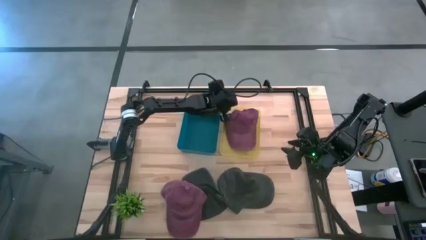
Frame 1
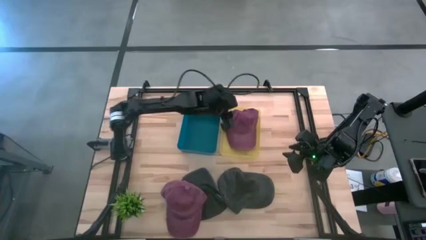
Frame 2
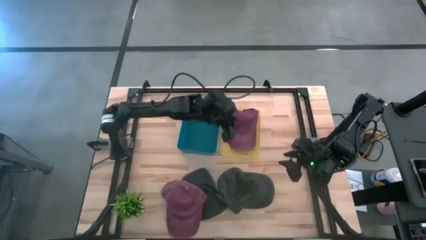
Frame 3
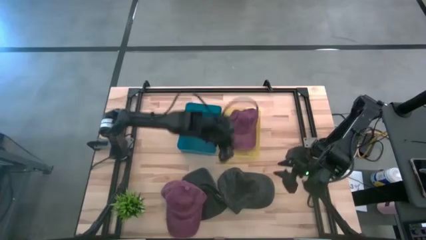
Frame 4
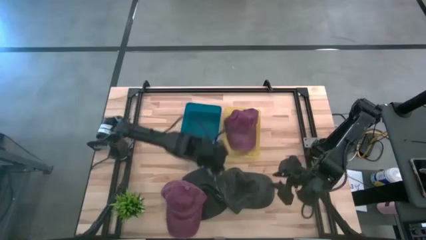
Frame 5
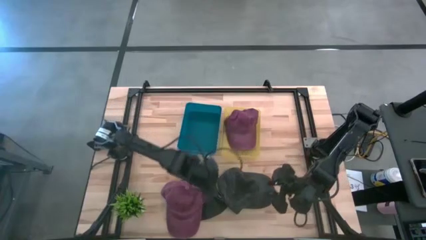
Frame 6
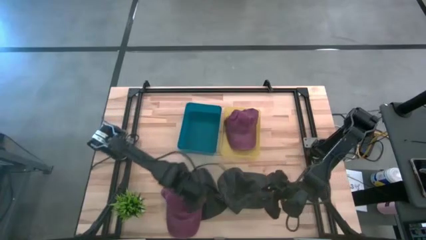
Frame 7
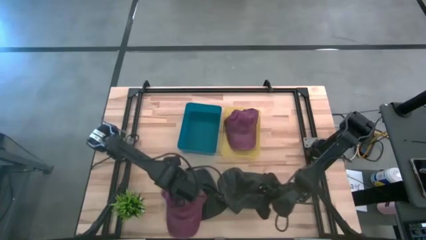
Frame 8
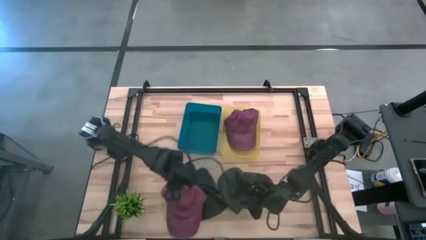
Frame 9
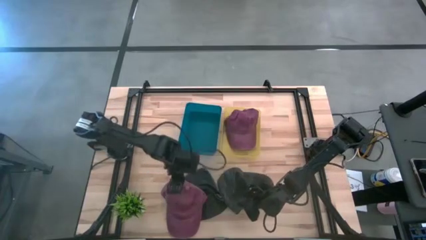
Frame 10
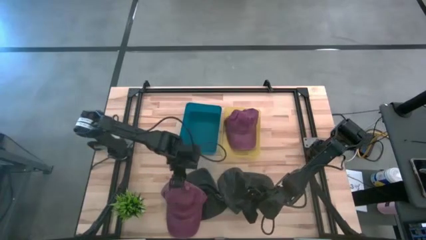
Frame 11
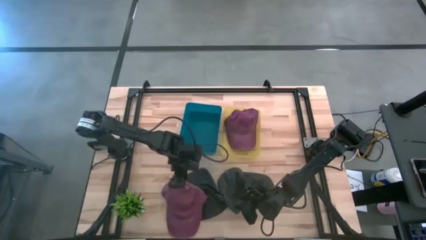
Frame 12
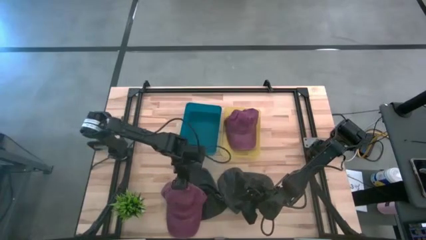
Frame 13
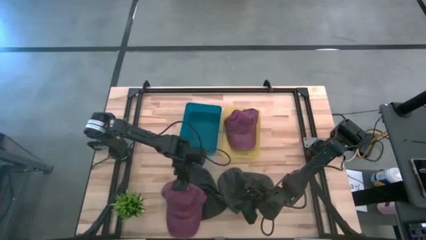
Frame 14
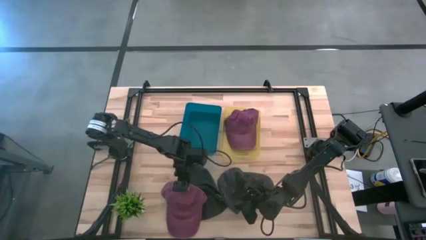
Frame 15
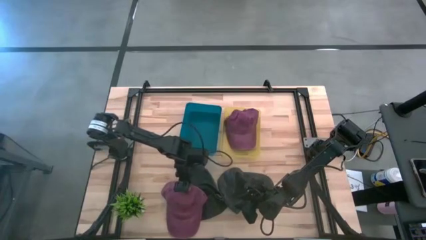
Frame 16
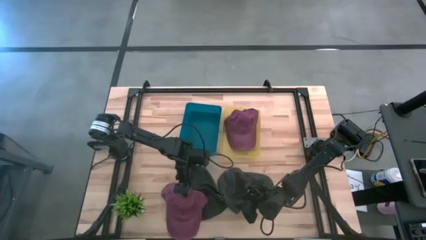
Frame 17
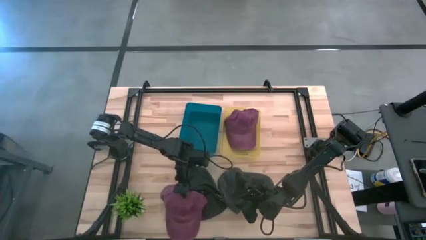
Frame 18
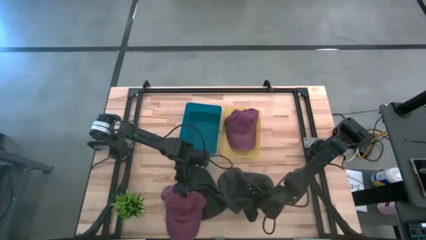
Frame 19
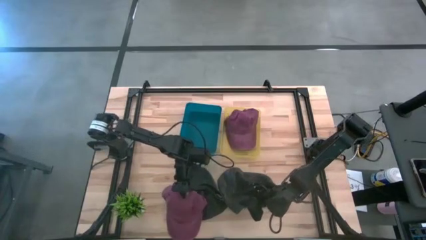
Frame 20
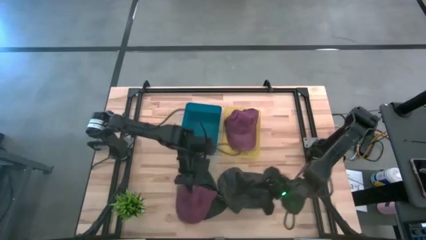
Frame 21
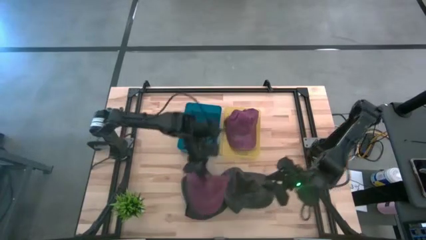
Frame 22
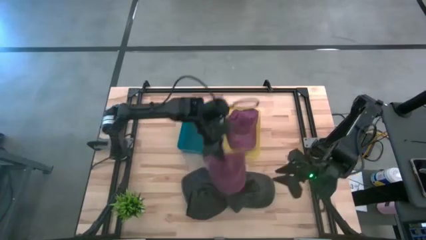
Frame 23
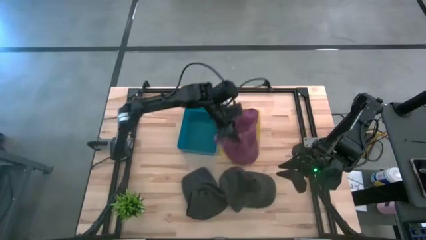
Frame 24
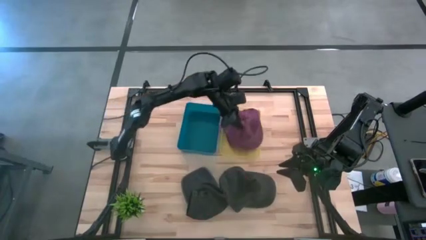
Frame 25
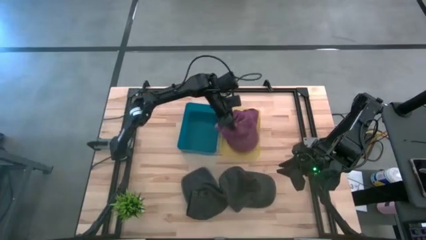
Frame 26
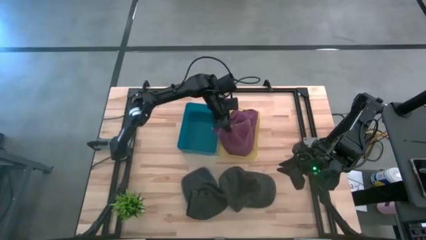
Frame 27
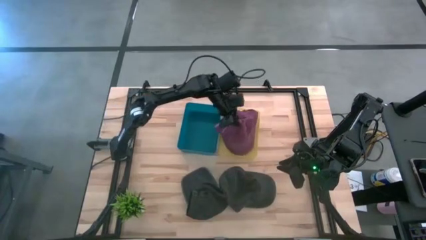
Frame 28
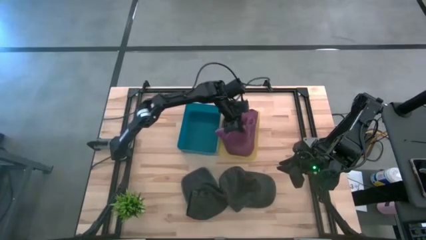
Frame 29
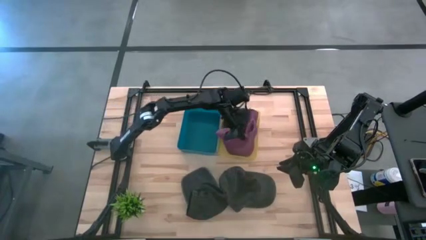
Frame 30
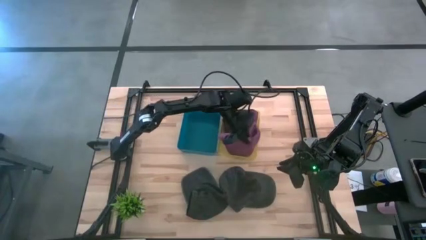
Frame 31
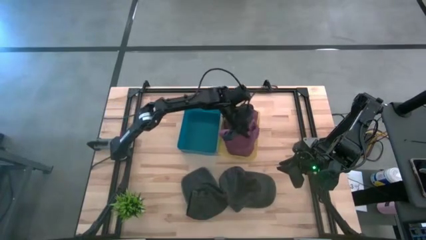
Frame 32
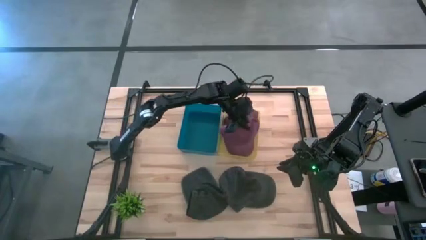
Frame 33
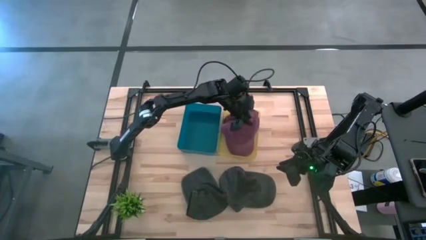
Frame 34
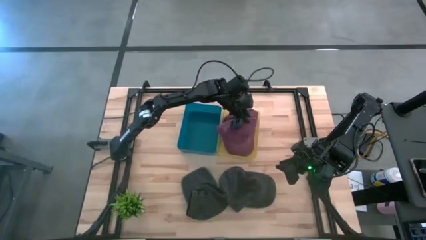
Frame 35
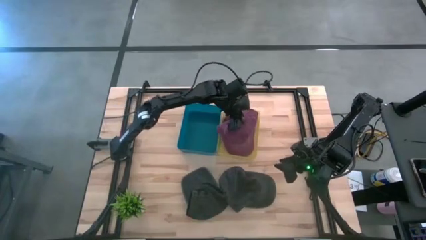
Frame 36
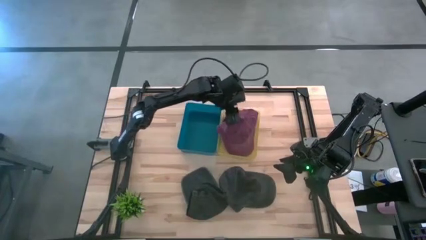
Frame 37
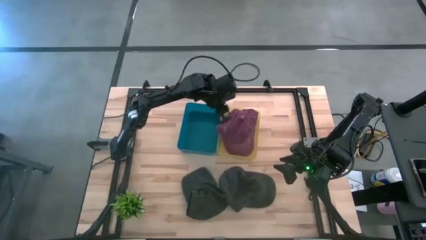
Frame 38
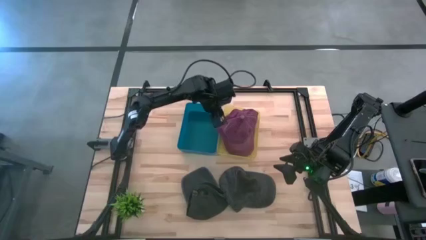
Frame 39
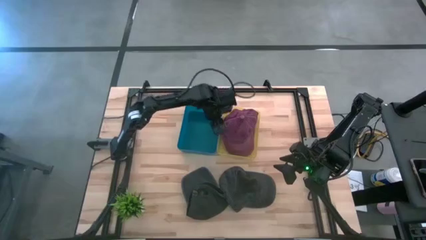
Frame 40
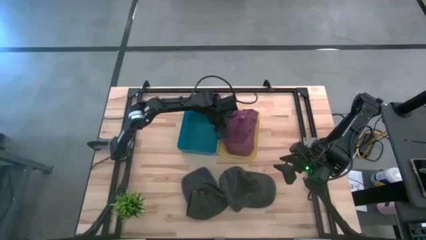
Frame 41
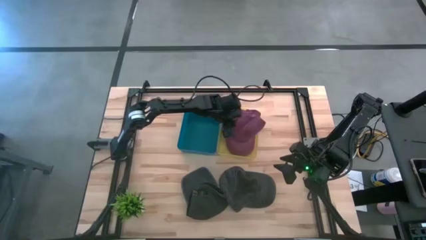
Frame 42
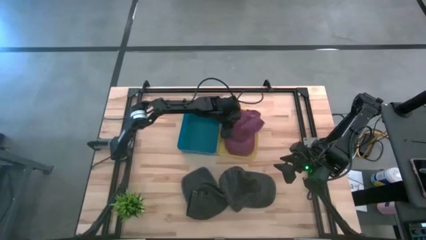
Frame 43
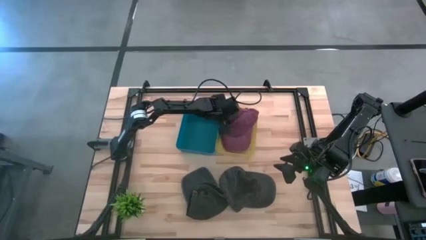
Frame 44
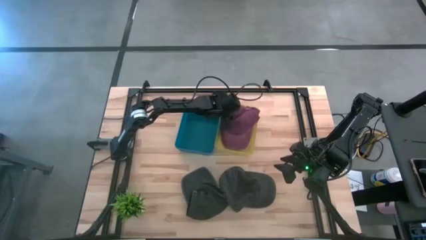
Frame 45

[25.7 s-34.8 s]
Task: Pick & Place hat
Put the red cap into the yellow bin

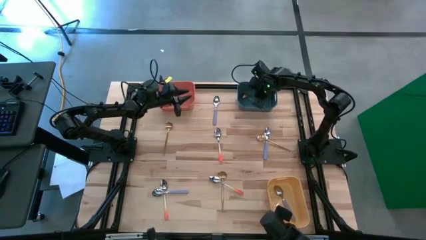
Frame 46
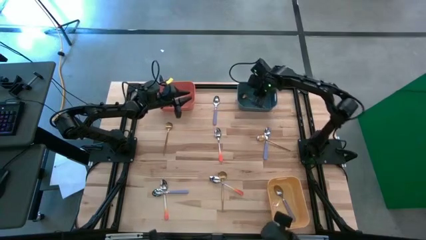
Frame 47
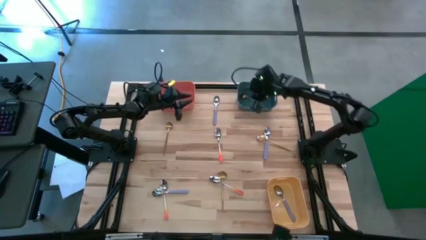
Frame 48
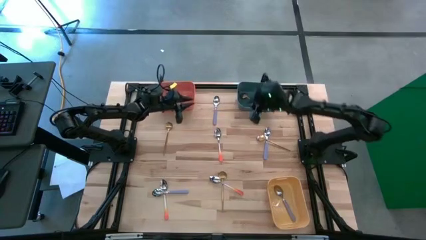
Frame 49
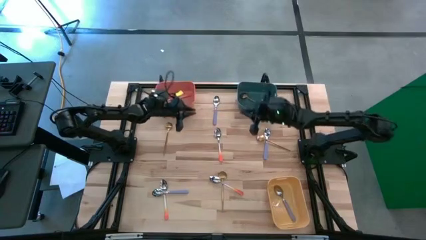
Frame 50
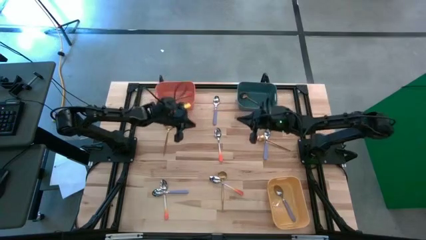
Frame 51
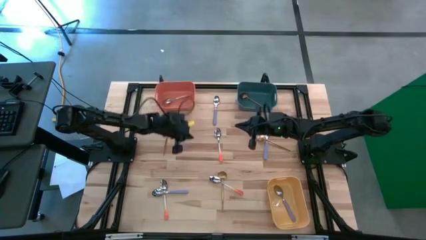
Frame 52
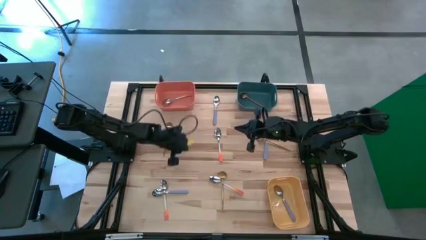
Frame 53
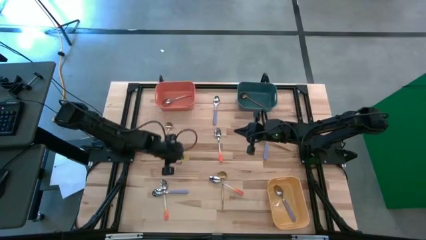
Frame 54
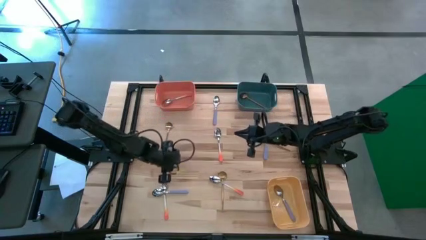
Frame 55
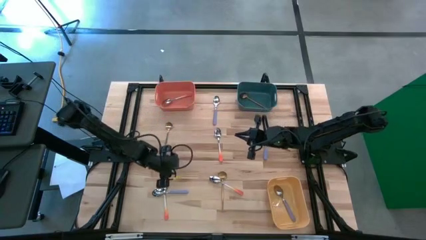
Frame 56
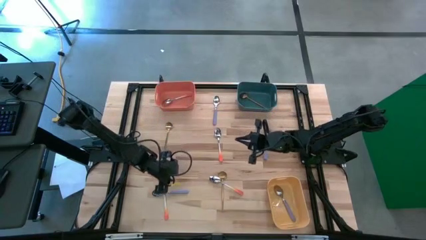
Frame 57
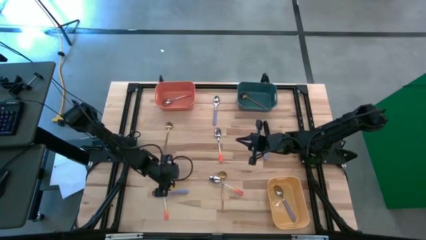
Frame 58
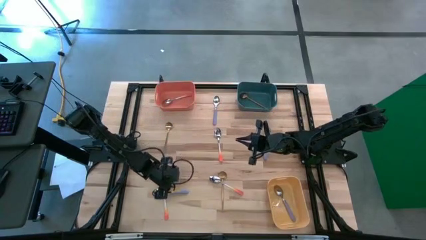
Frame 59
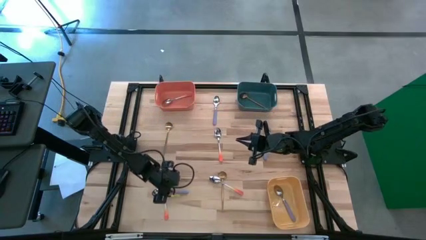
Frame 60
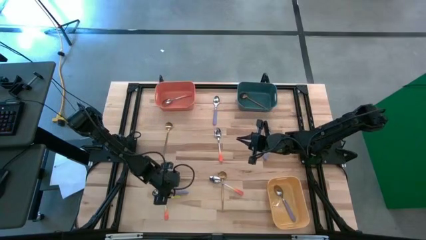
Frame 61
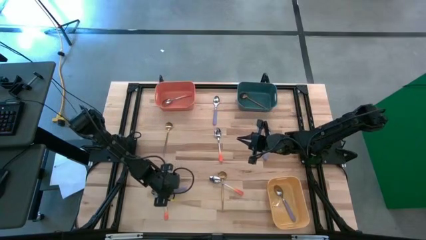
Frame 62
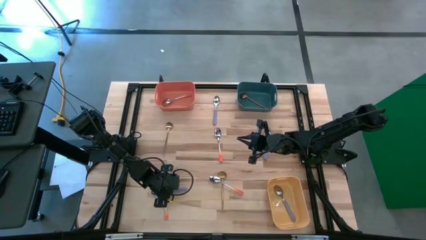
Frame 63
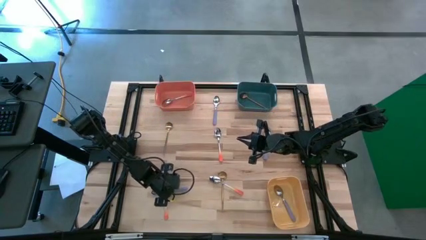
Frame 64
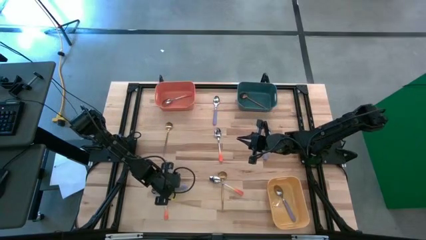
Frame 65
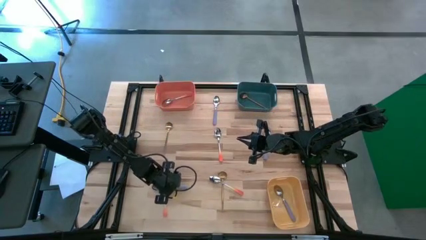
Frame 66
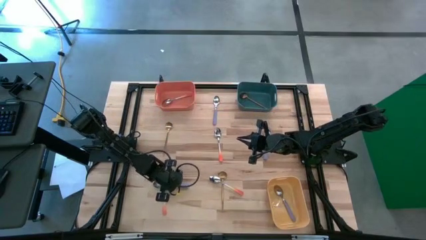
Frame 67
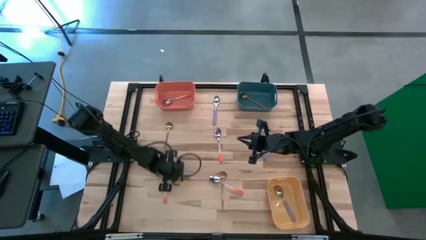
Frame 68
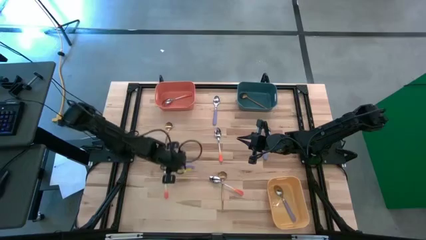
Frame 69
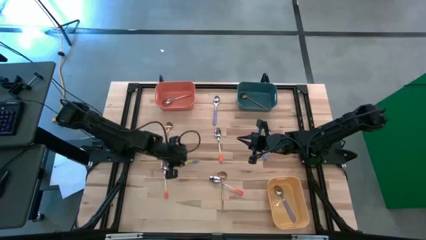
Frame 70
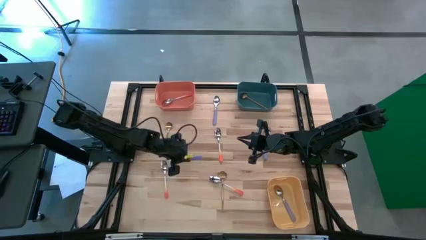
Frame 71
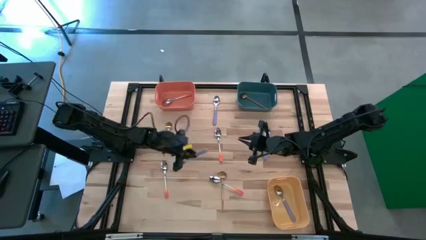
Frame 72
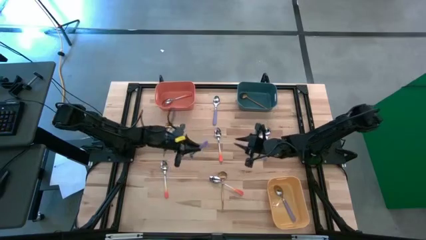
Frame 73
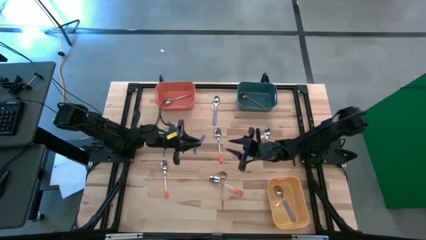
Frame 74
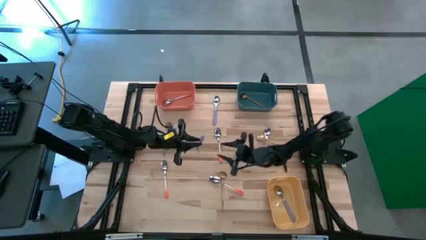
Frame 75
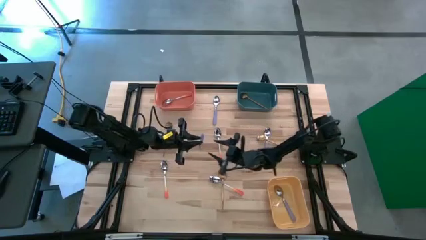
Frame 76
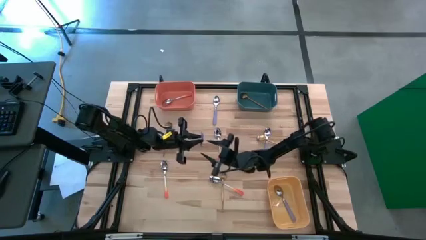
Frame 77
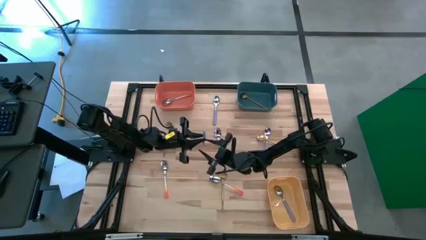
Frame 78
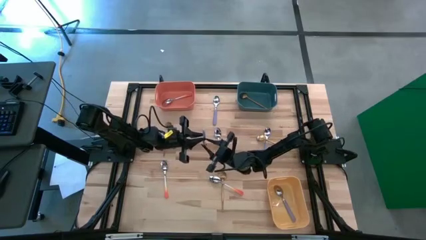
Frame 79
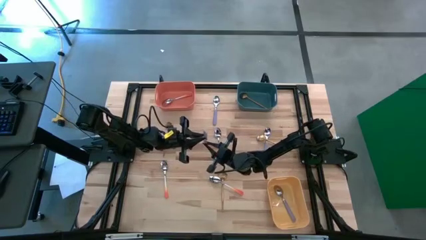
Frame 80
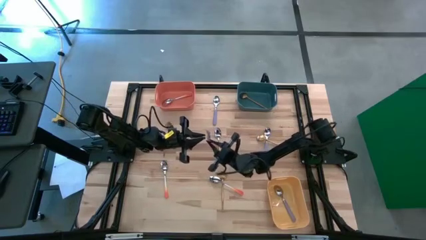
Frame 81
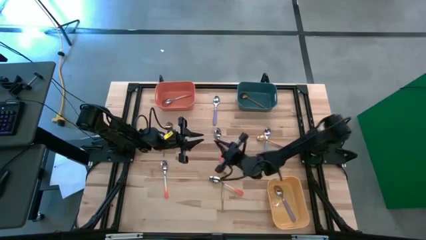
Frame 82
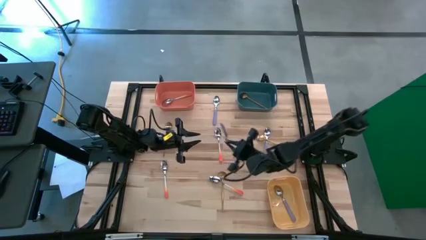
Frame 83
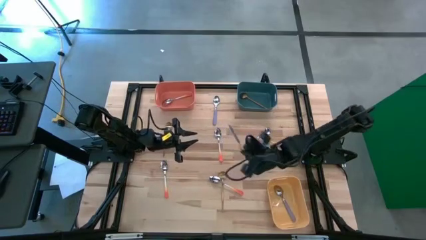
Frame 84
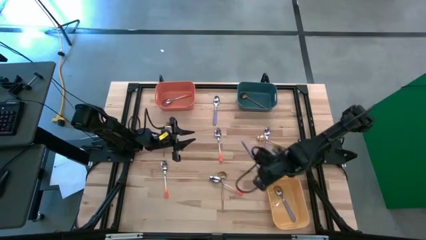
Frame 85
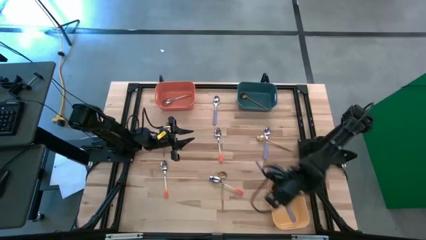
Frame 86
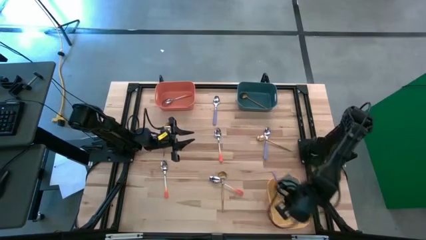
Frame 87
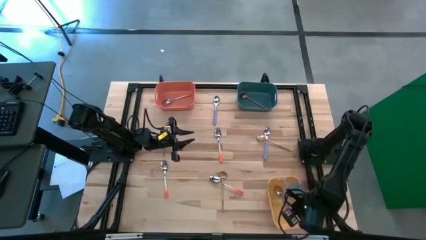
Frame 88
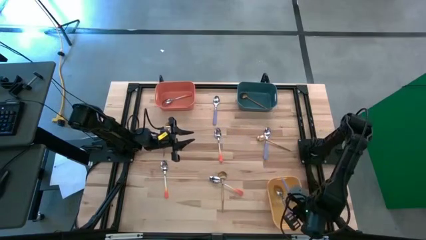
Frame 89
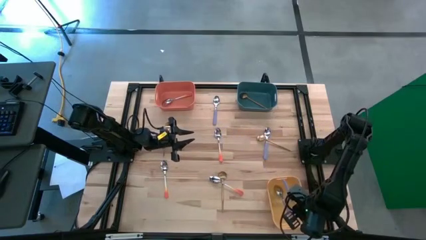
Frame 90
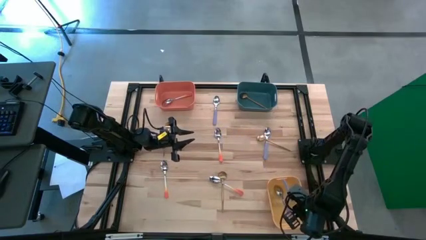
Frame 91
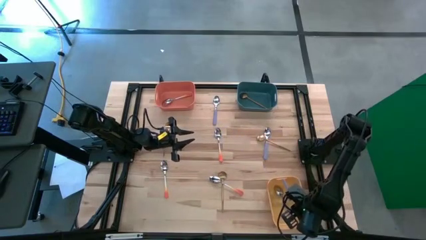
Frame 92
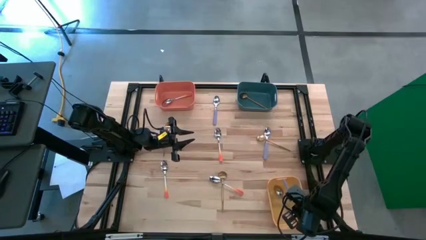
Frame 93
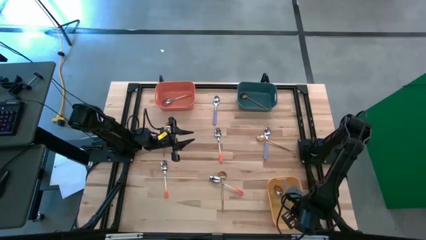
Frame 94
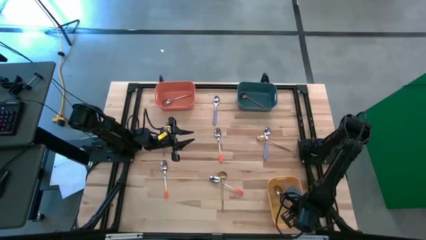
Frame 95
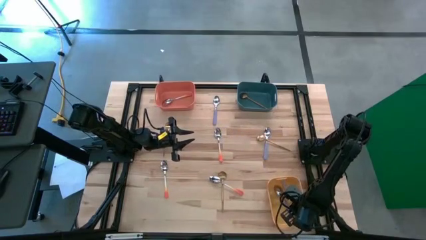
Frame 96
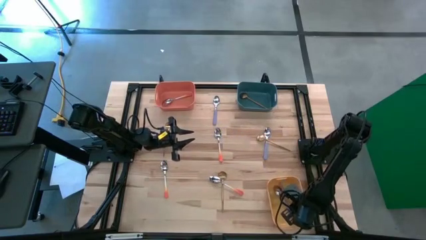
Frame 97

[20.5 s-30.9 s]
Task: Sort silverware by color (type)
Put the violet spoon into the yellow bin
